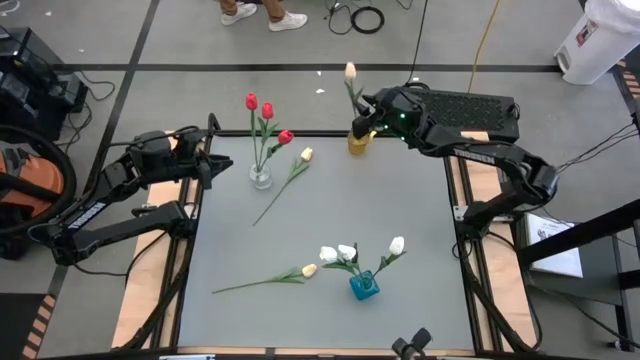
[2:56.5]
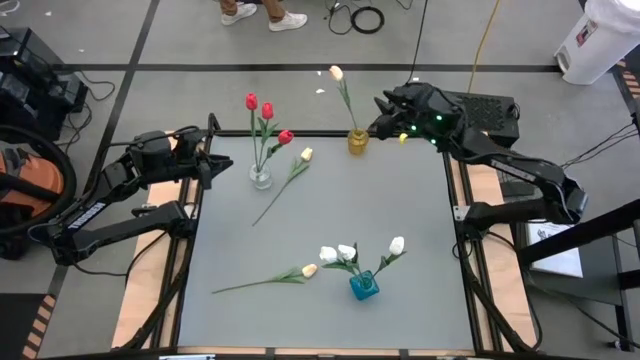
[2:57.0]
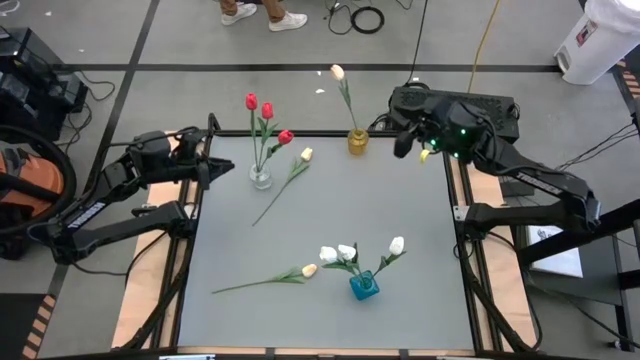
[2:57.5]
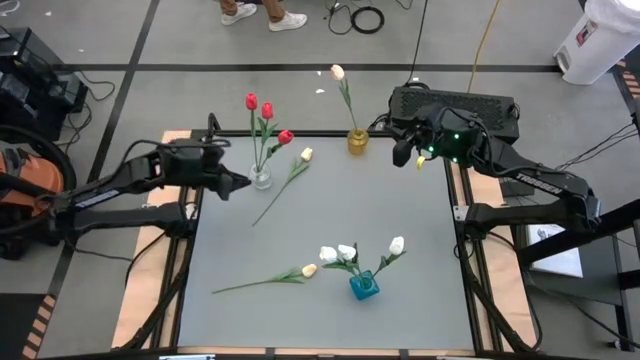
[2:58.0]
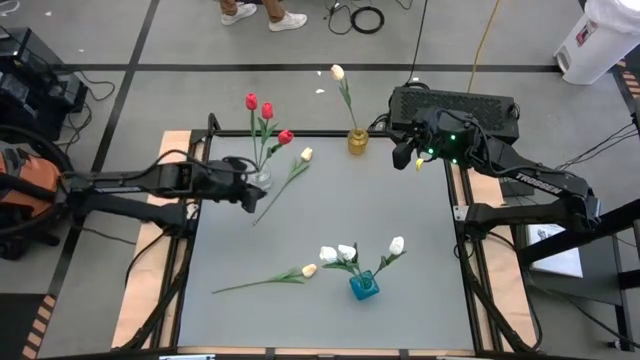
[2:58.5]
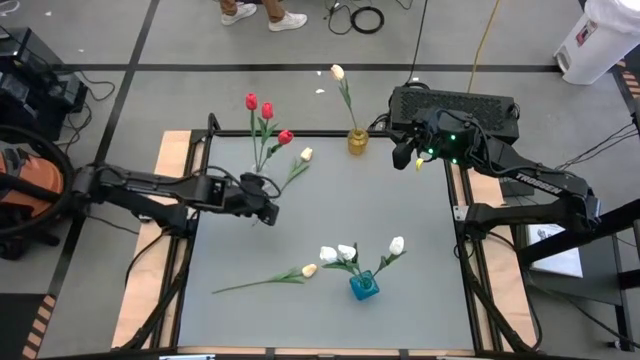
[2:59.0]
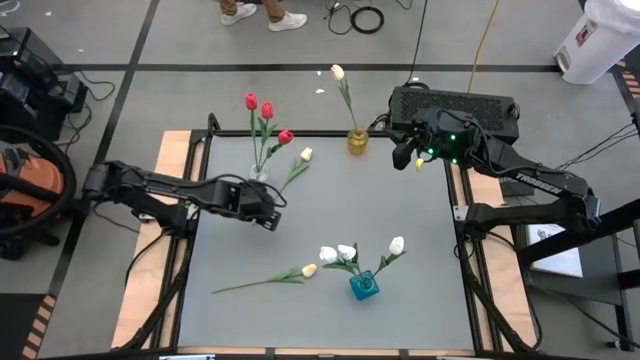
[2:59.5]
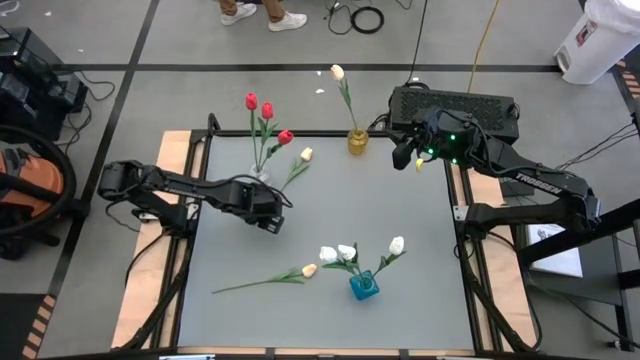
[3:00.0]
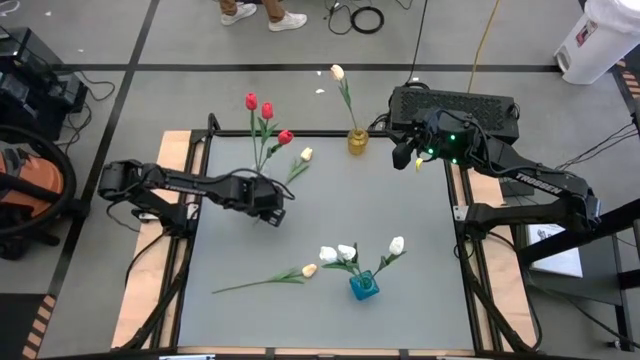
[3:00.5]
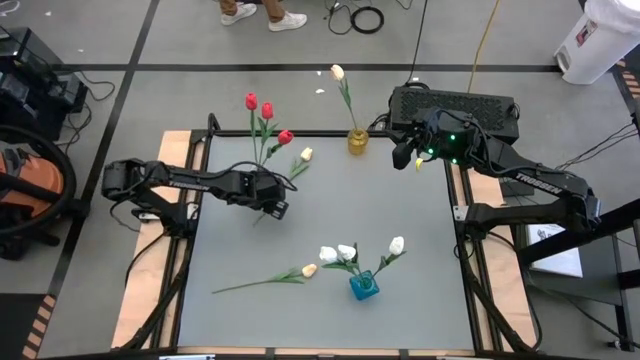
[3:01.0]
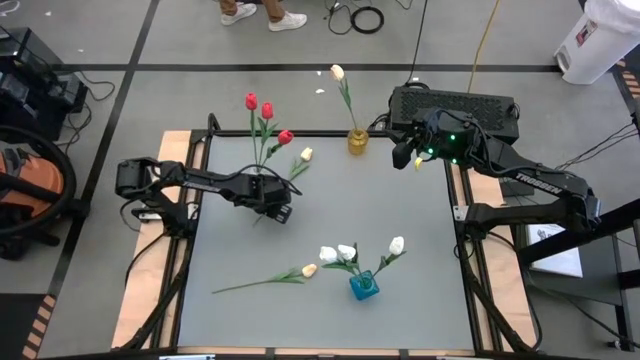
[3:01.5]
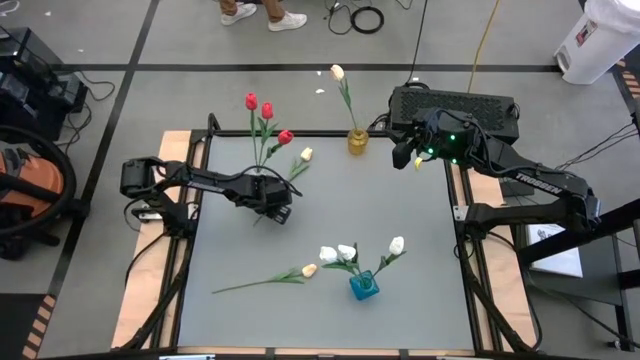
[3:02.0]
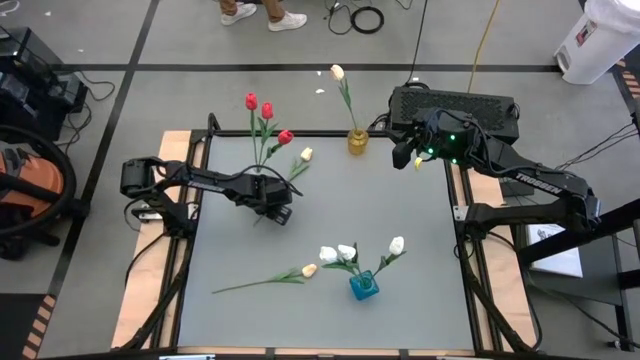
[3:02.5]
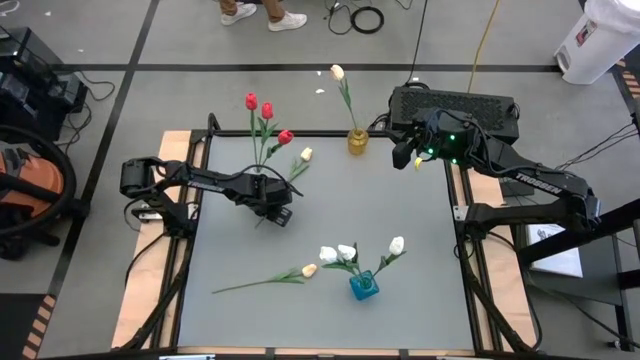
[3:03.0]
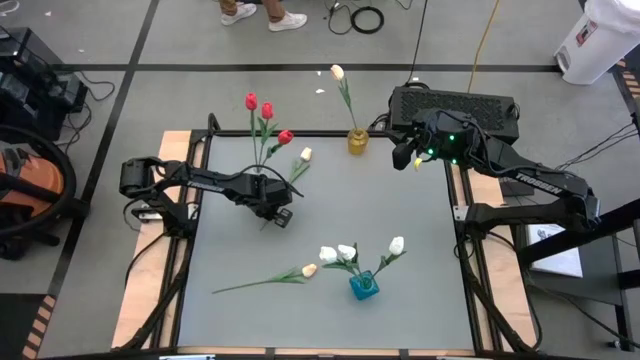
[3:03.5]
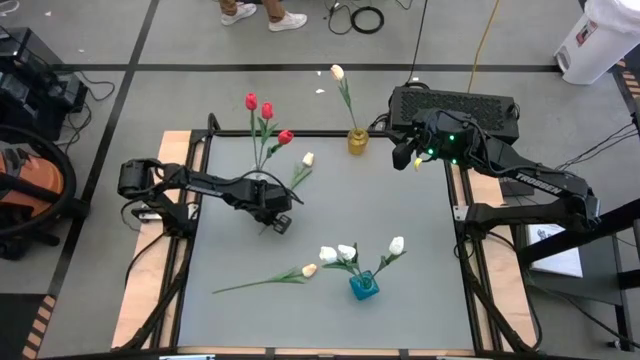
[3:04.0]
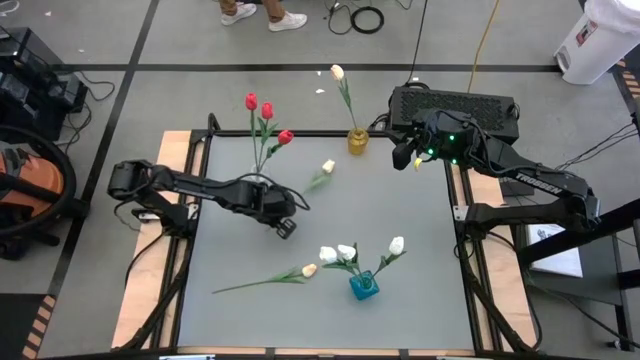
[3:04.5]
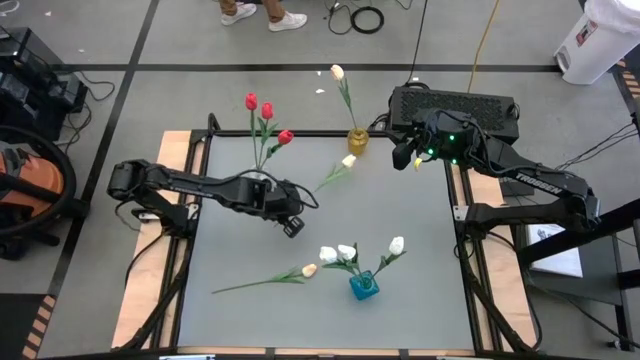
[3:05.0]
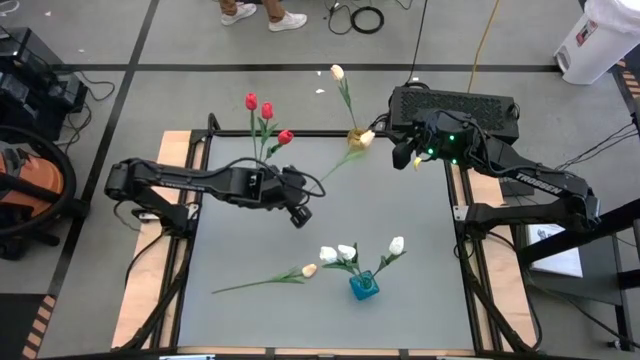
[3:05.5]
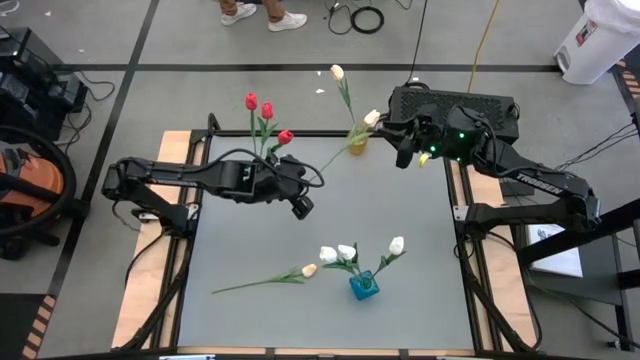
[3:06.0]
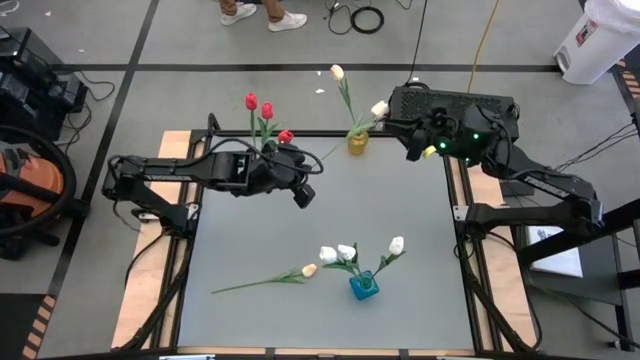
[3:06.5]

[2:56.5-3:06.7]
Task: Sort flowers into vase by color
Put the top light yellow tulip into the yellow vase

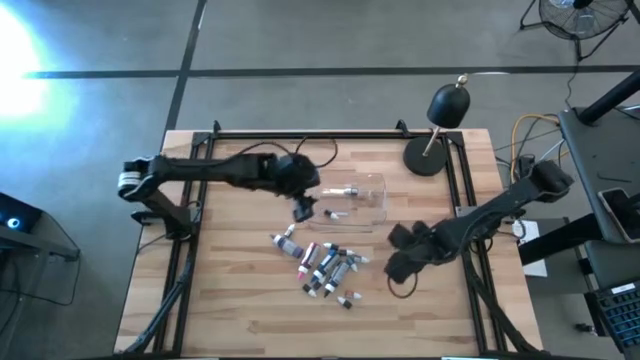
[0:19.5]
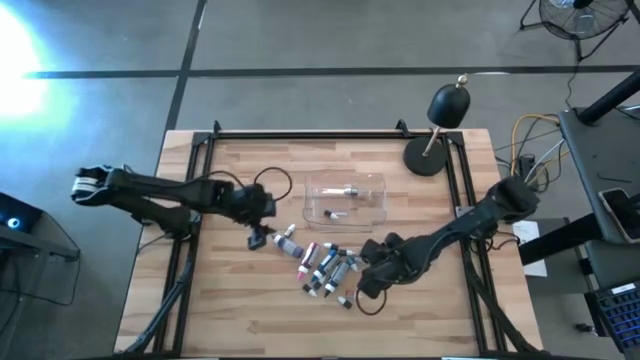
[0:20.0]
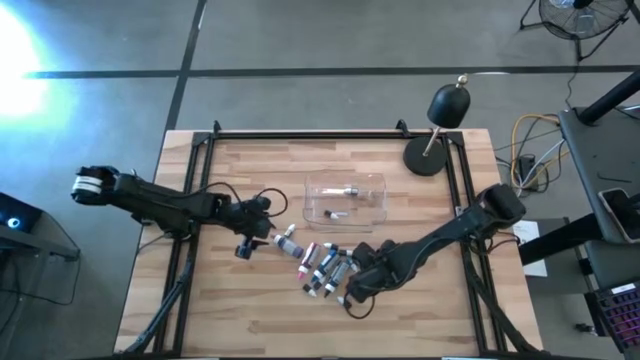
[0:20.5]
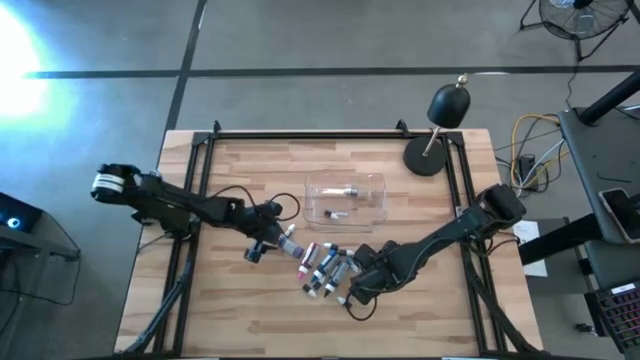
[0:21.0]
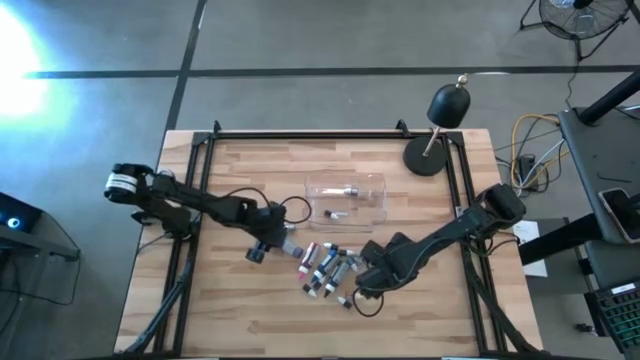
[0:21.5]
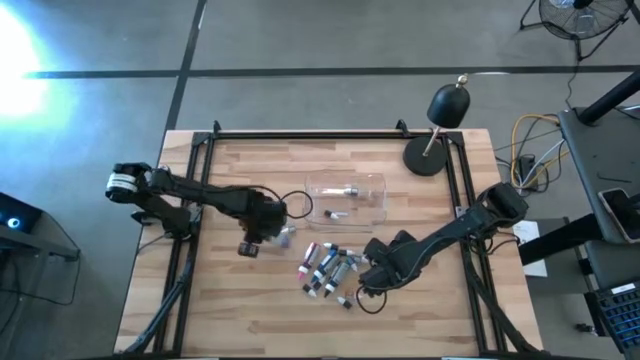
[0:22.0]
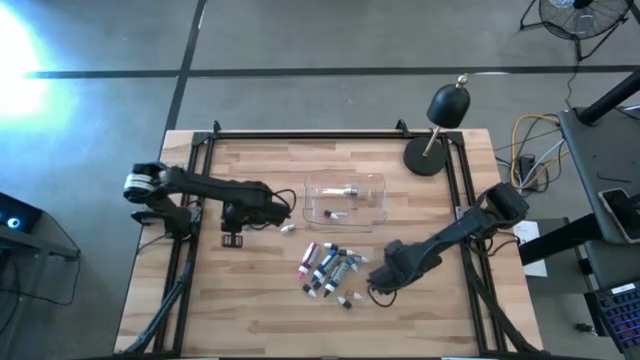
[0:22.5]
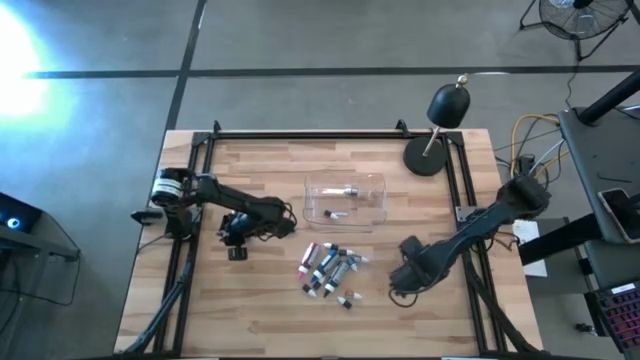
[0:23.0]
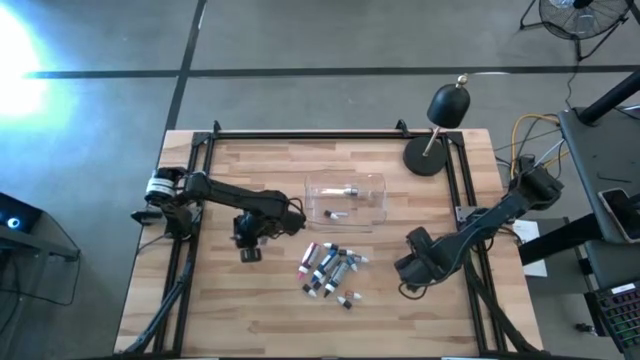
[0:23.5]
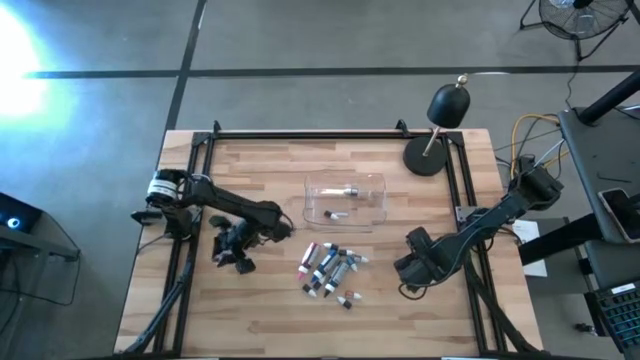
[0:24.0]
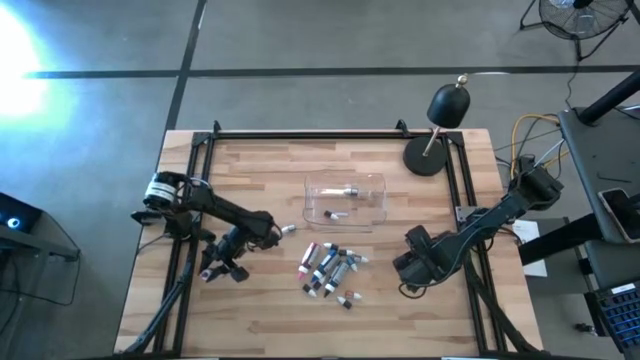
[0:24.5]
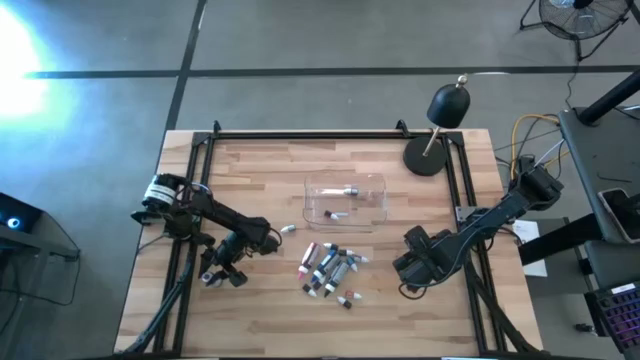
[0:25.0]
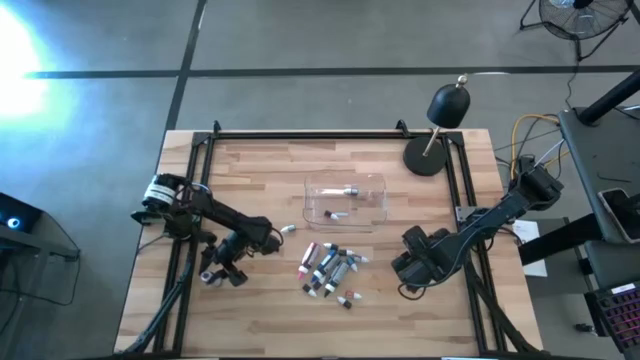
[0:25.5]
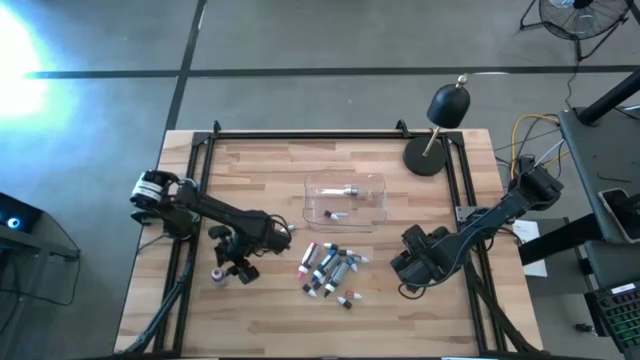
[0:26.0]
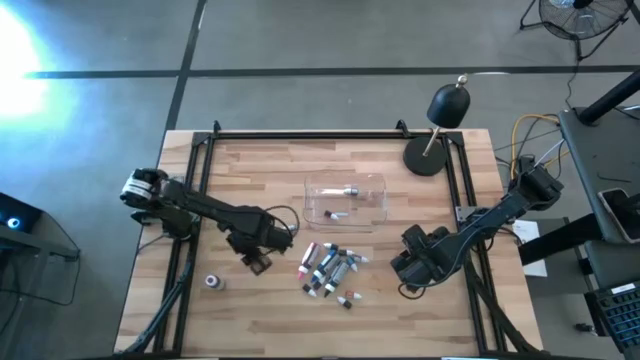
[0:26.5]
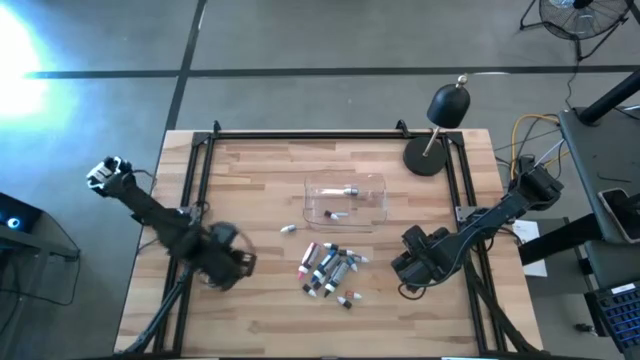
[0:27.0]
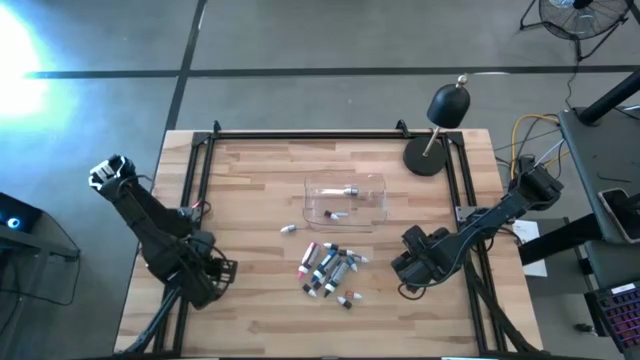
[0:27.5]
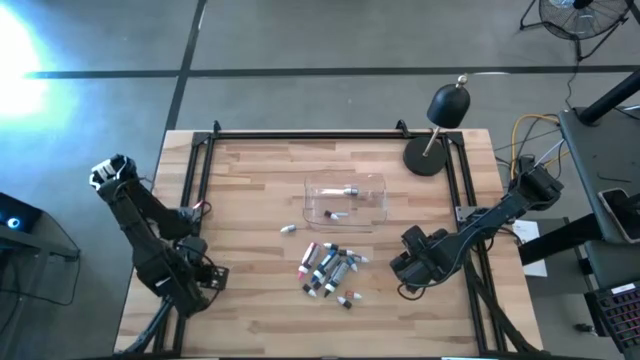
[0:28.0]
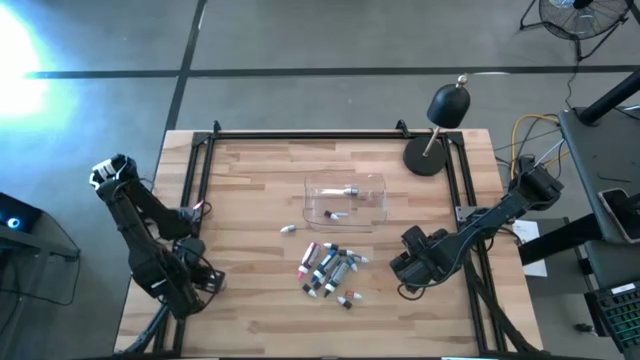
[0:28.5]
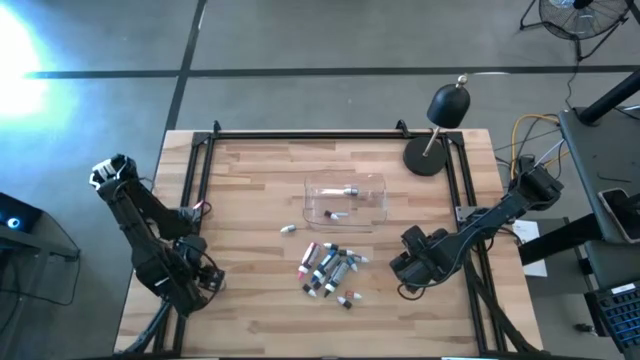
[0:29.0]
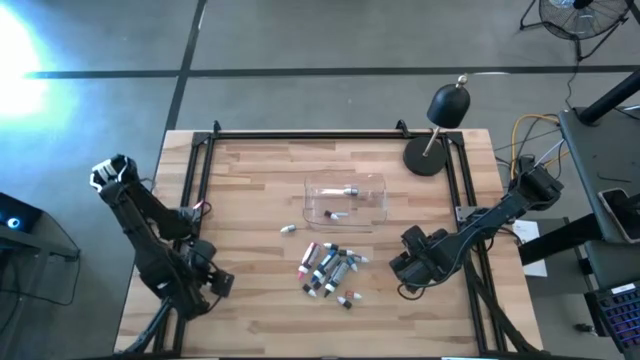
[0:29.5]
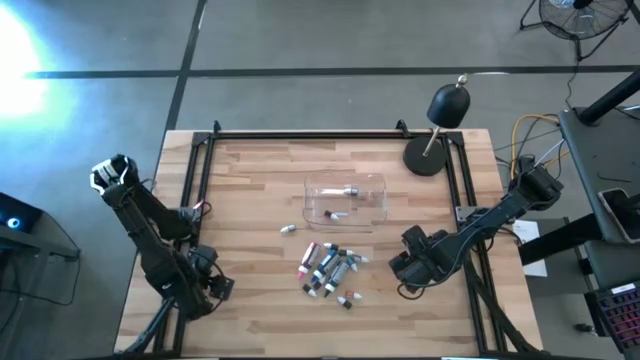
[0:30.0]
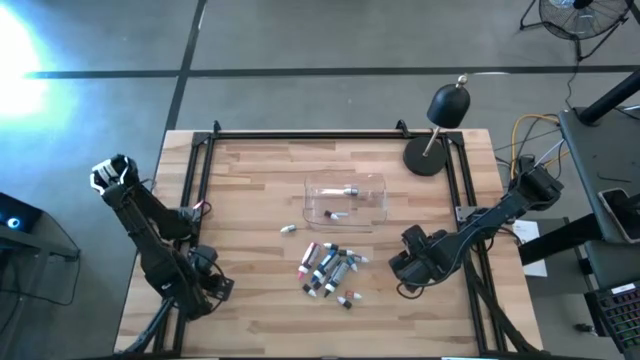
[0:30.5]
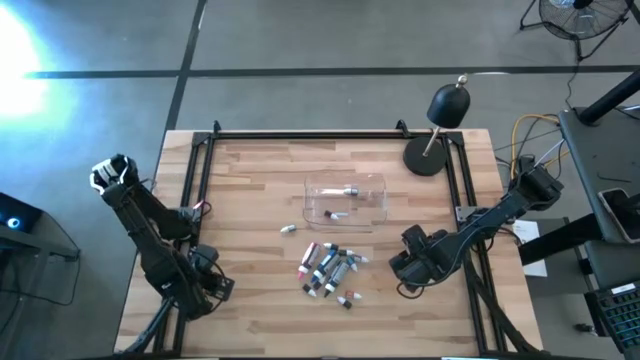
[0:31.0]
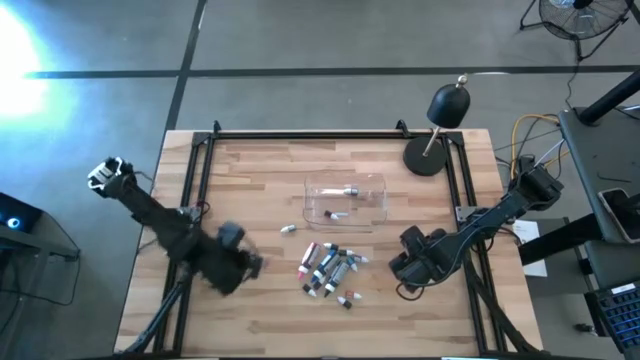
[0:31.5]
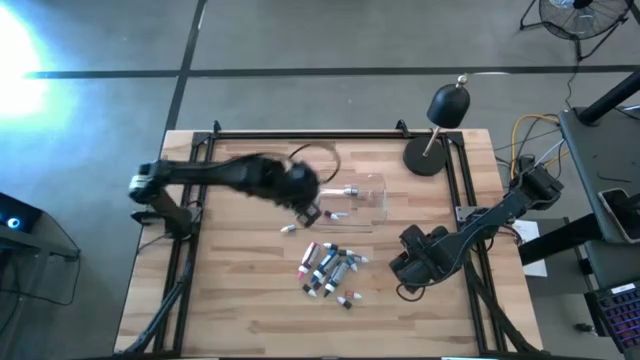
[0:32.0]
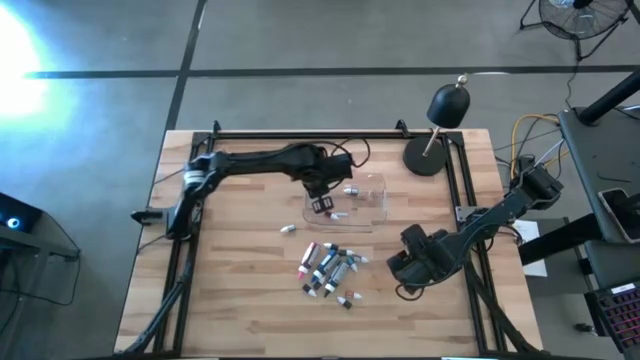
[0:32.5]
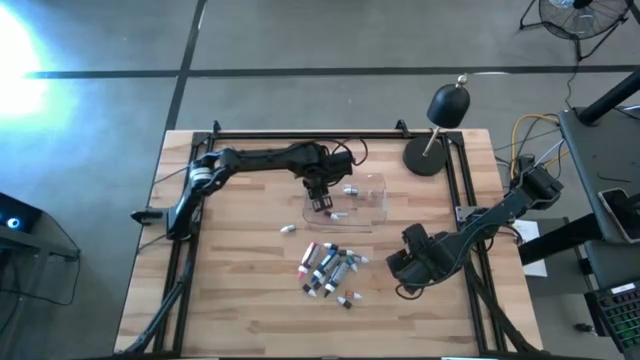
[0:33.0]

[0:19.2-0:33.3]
Task: Pick & Place food coloring
Put the large purple food coloring bottle into the transparent bin
